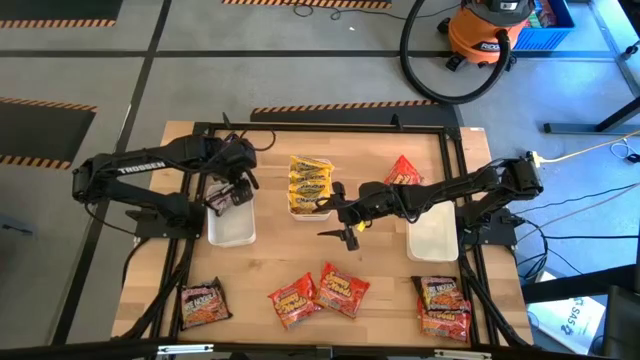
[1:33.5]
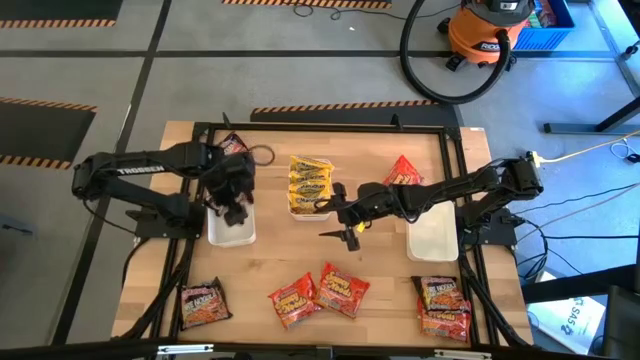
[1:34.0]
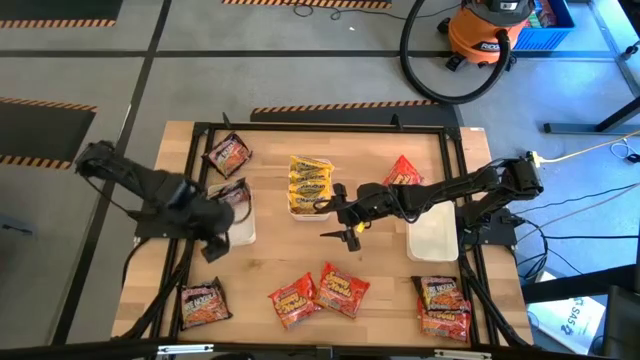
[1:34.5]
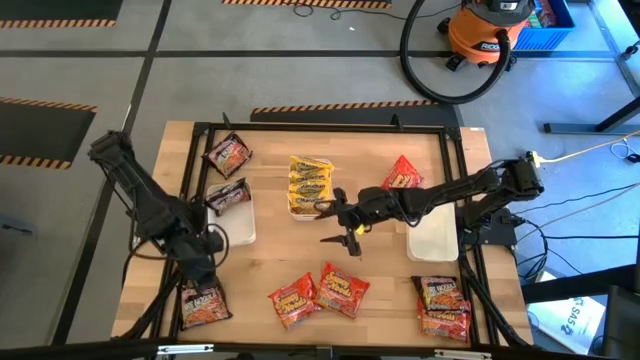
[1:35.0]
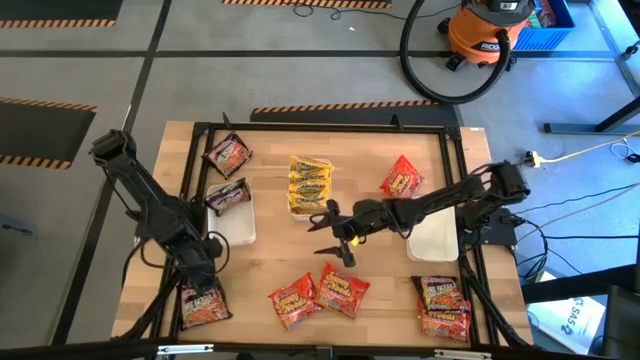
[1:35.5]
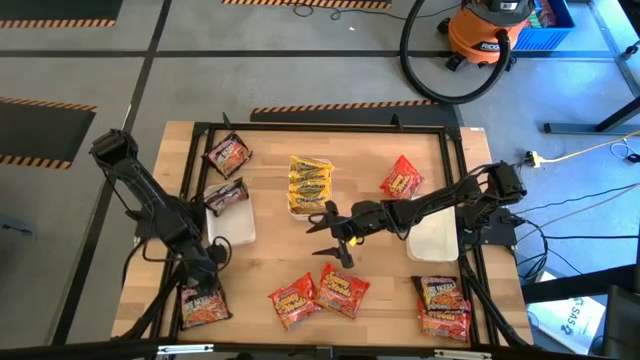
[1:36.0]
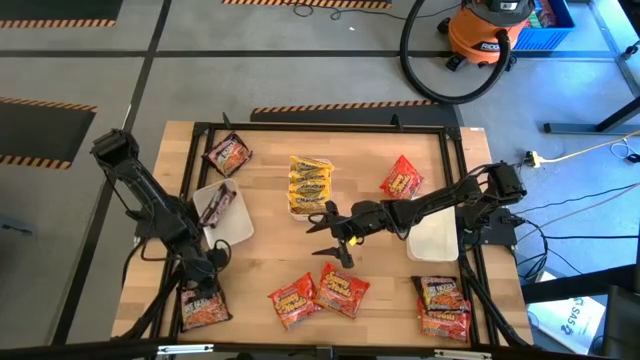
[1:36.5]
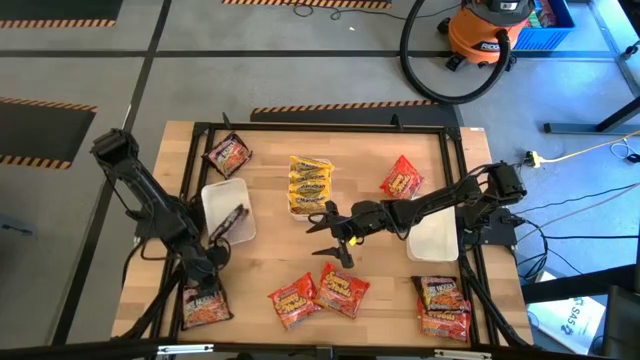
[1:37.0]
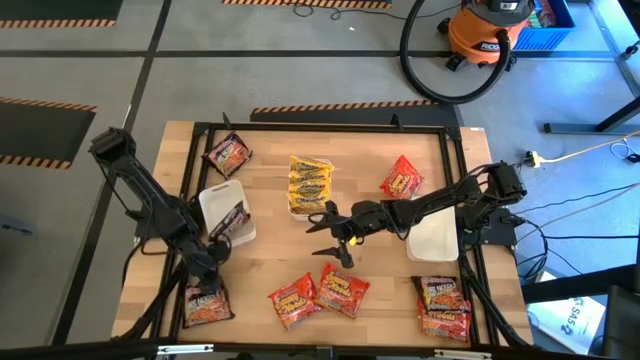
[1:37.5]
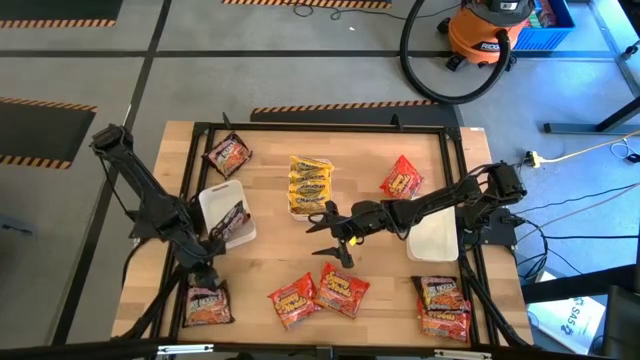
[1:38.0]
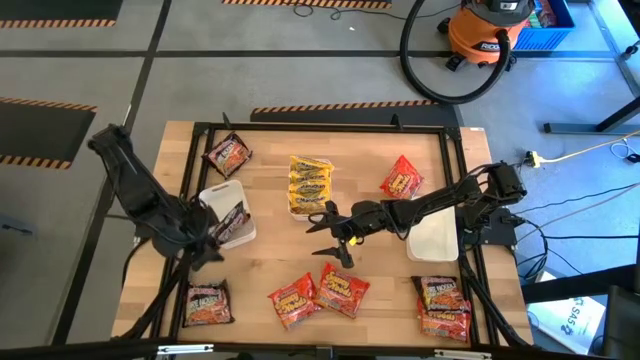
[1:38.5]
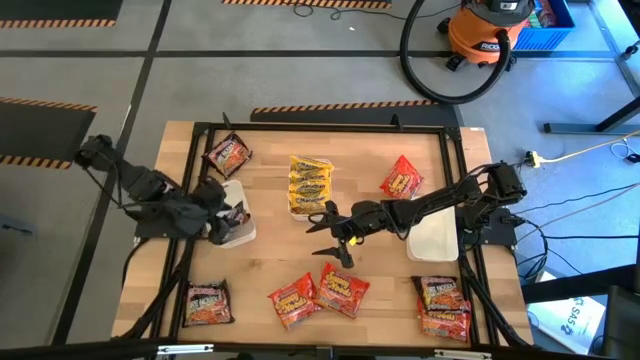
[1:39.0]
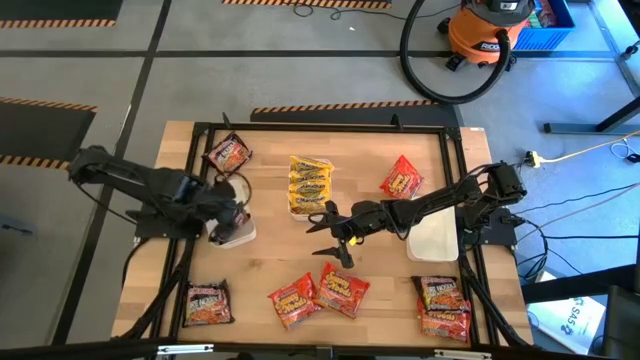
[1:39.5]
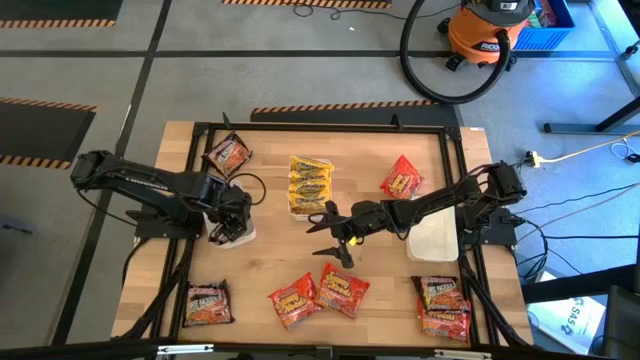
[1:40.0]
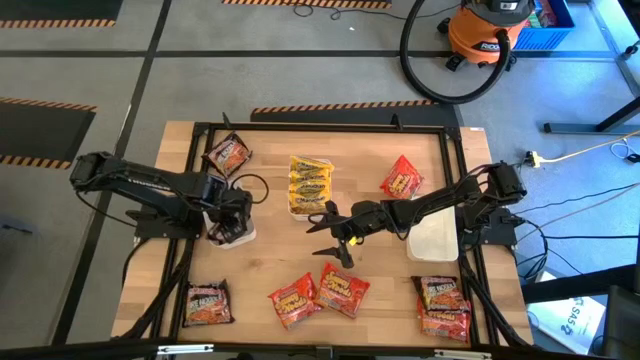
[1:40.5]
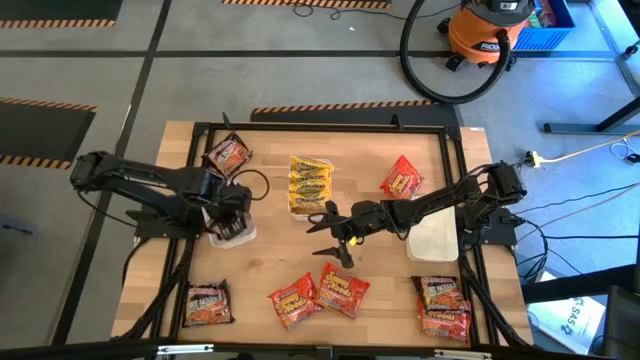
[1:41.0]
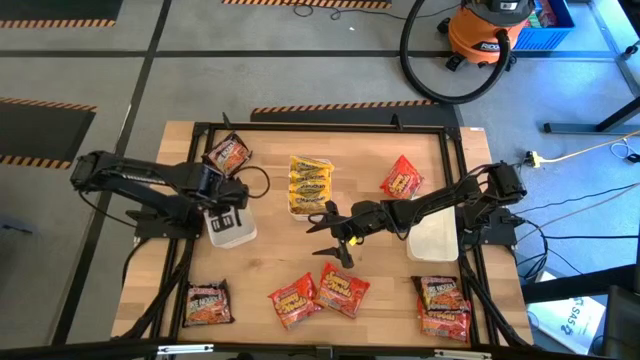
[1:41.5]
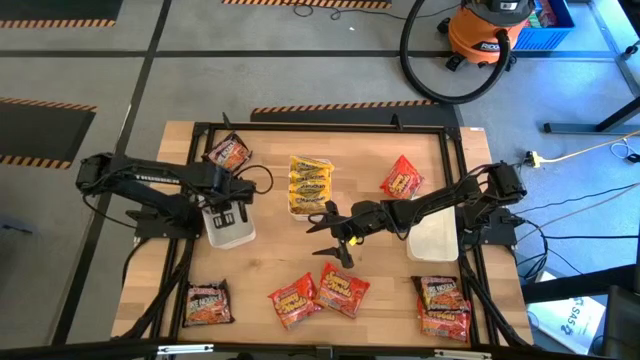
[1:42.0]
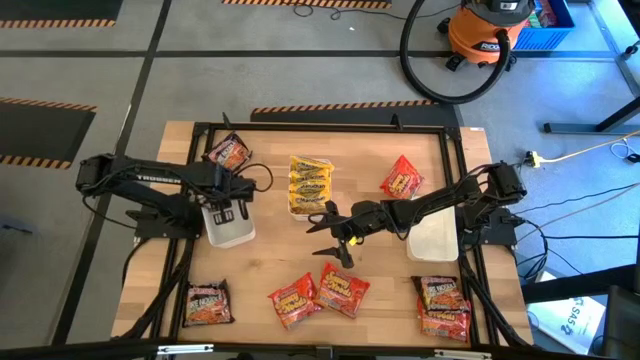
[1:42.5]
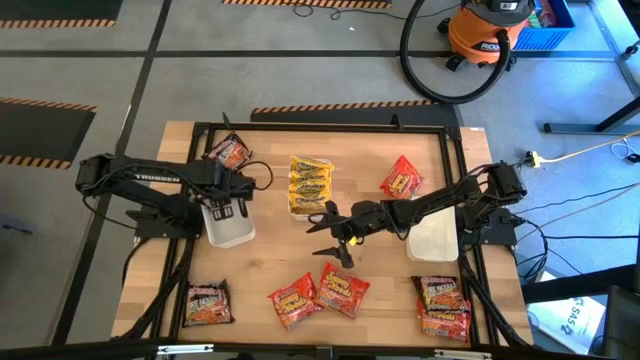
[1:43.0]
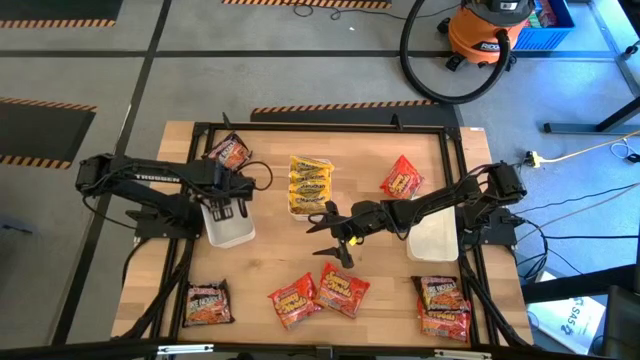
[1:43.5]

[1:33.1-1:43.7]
Task: Sort Maruchan noodles
Adjust the black noodle

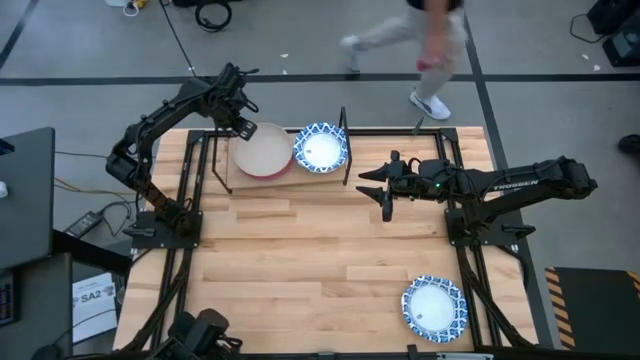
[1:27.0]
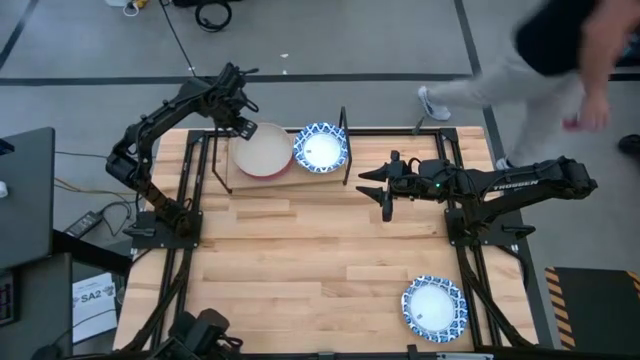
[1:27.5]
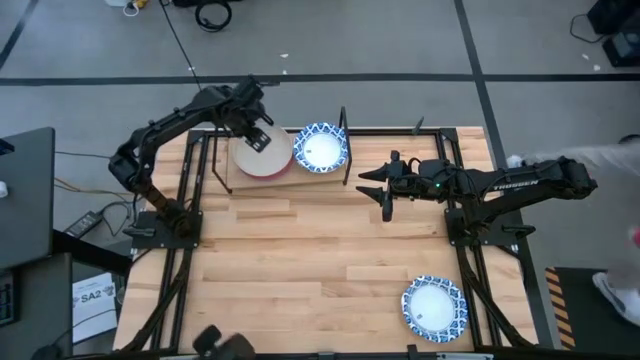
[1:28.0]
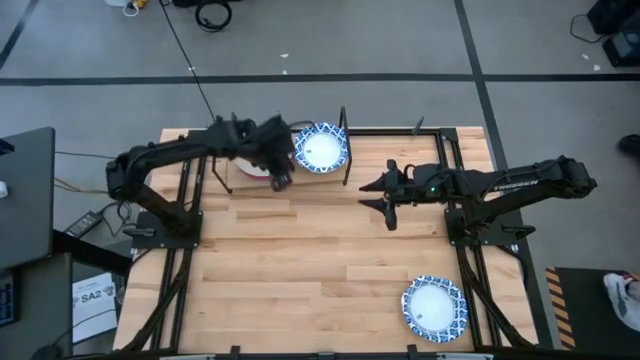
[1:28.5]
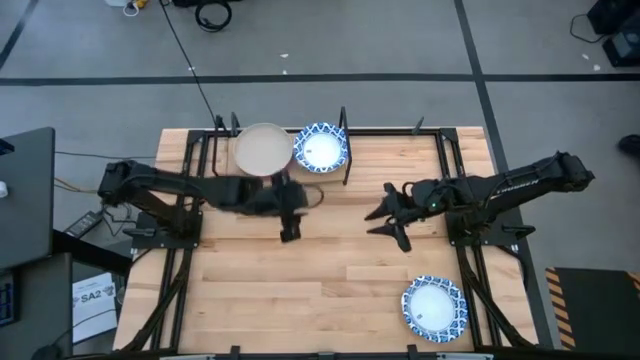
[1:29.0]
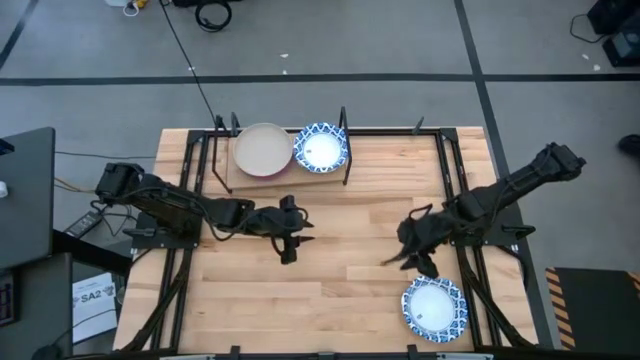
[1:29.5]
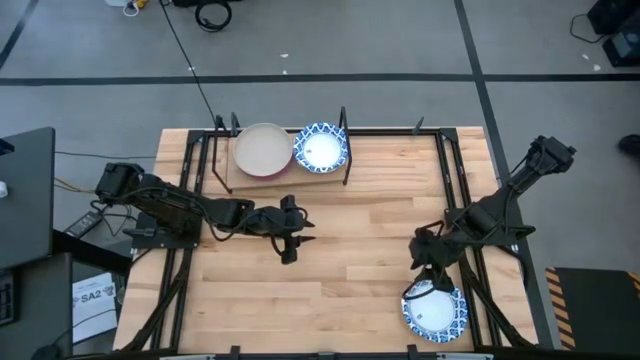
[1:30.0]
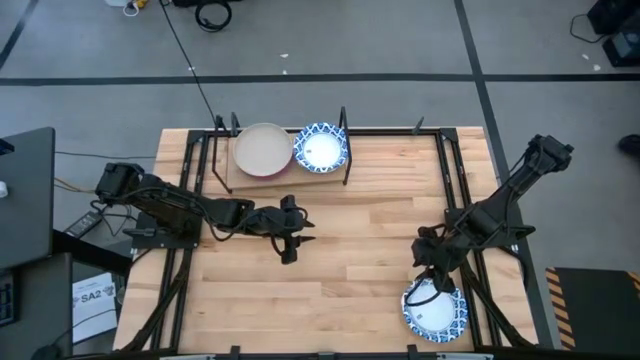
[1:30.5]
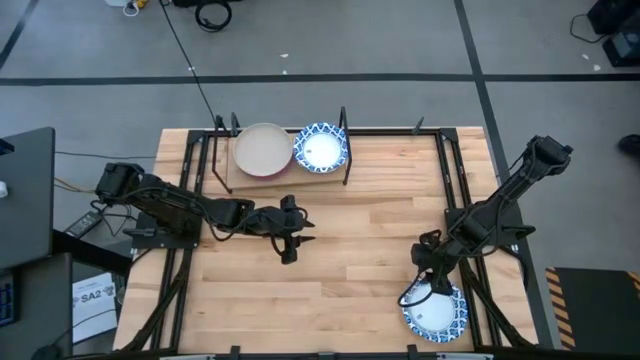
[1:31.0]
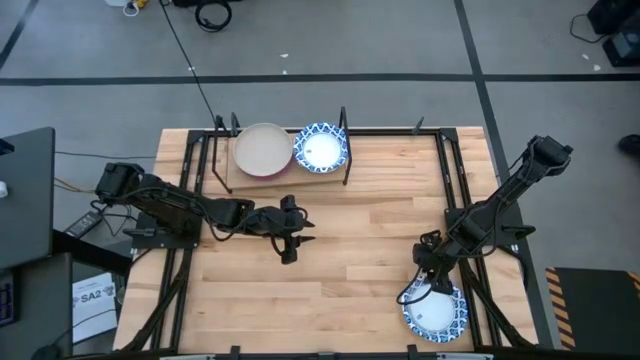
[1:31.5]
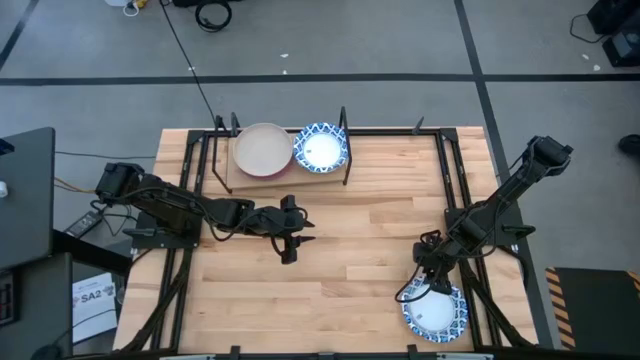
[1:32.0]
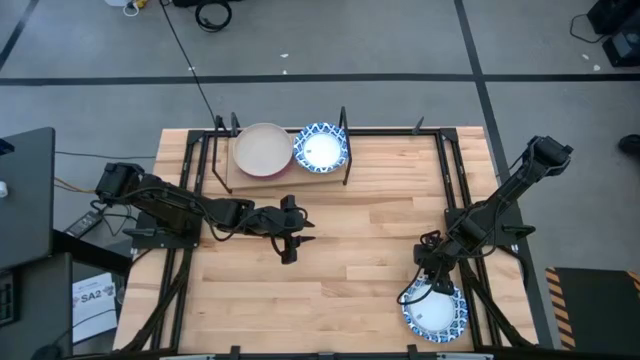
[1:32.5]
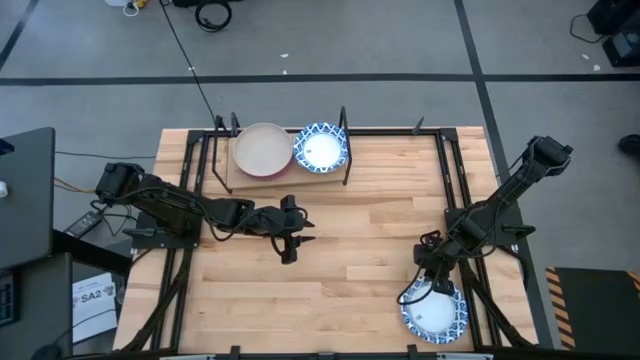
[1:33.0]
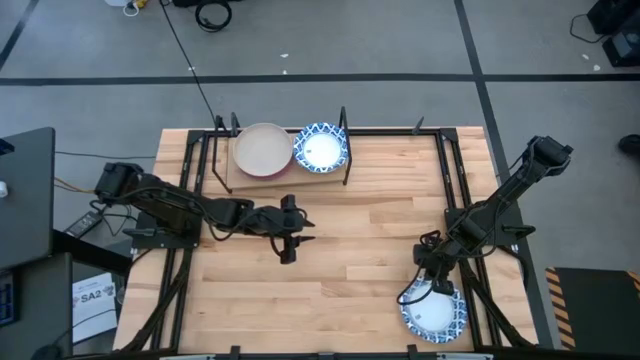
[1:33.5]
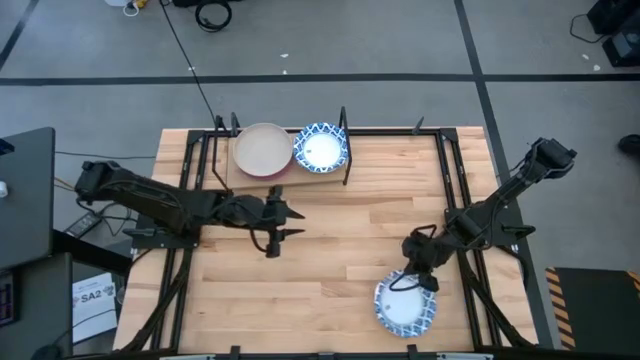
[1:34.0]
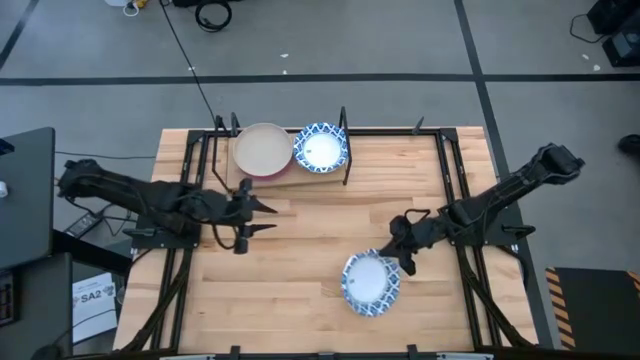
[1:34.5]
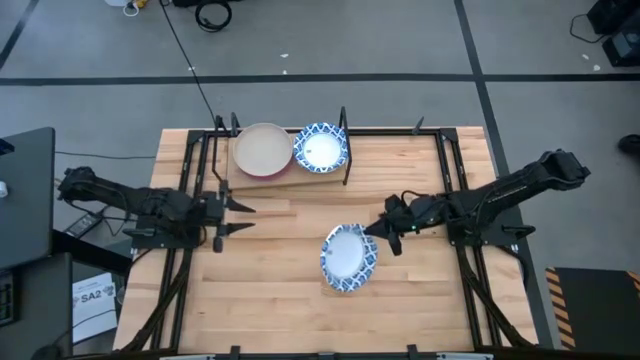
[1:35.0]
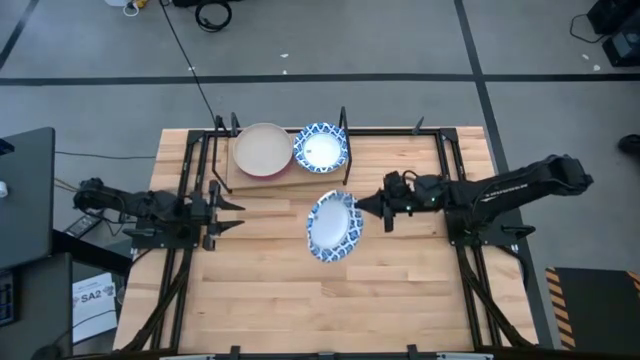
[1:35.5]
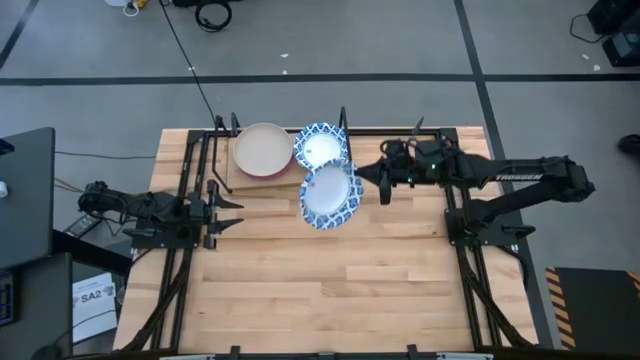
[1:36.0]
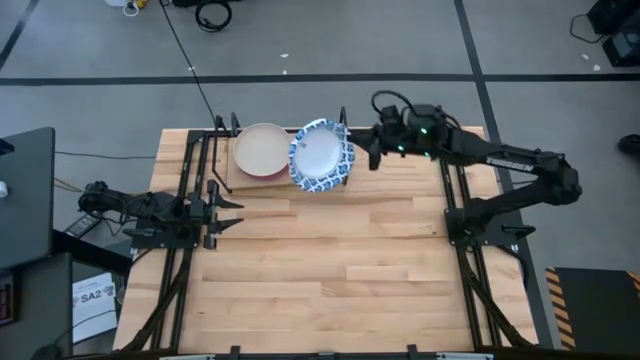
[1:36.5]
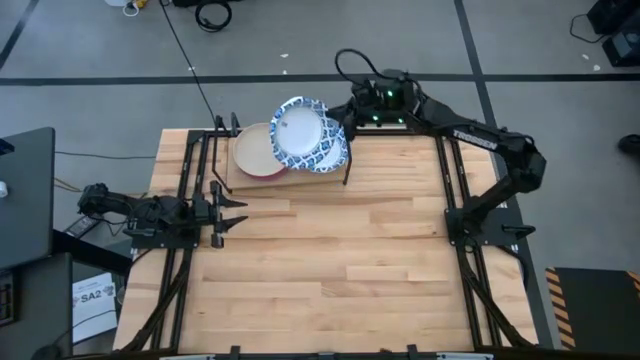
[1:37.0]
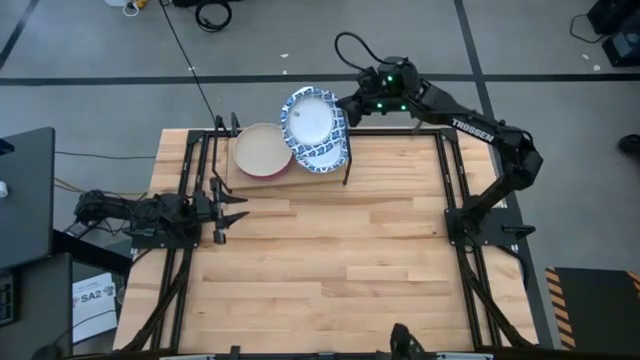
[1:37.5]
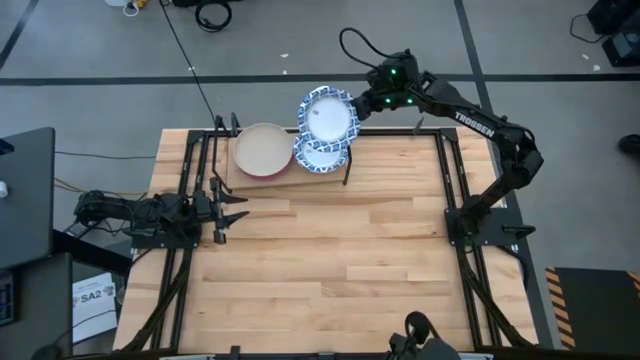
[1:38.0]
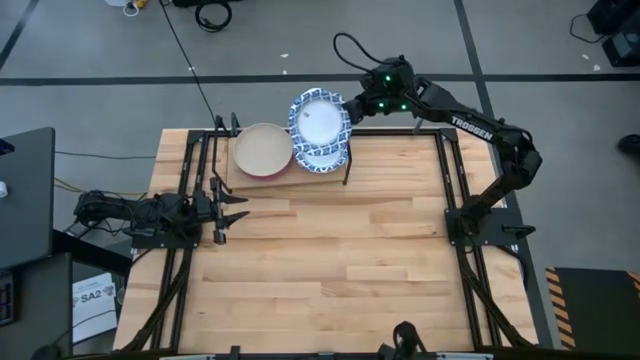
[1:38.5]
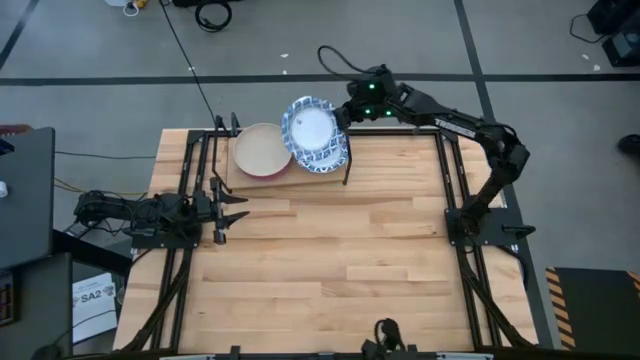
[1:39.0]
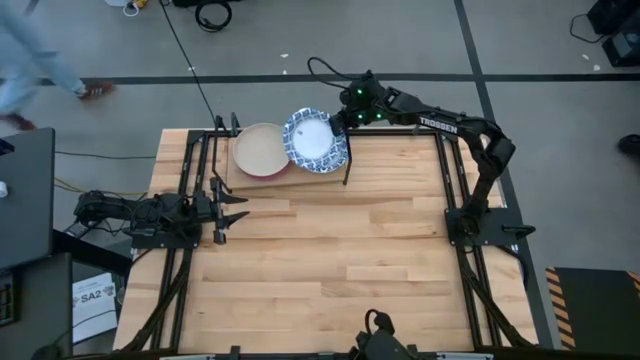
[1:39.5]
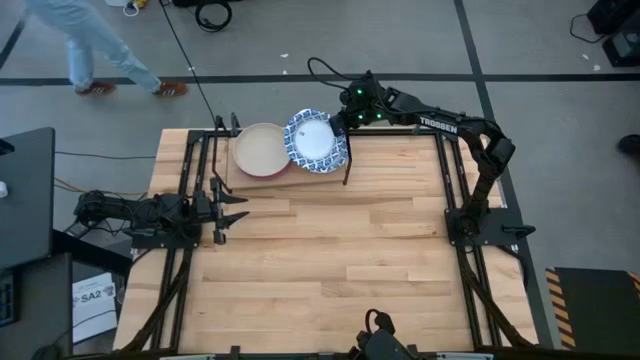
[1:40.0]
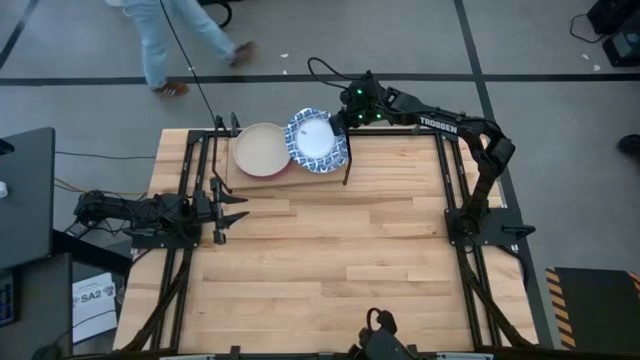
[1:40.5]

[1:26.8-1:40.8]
Task: Place and stack plates onto a shelf
Stack the blue patterned bowl on top of the blue patterned bowl on the shelf
